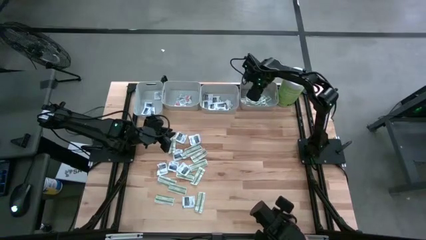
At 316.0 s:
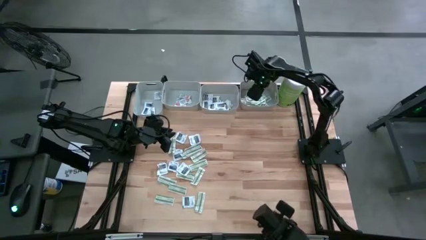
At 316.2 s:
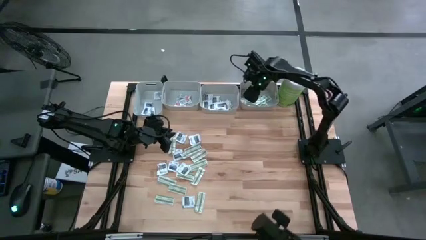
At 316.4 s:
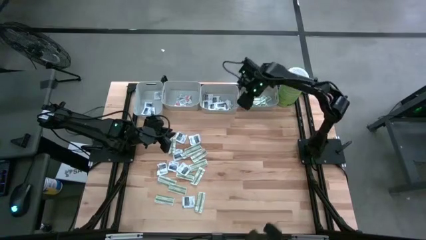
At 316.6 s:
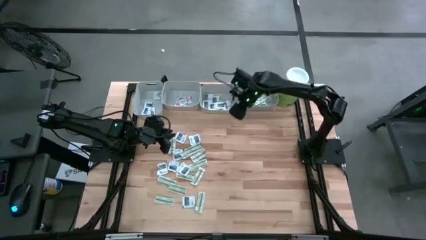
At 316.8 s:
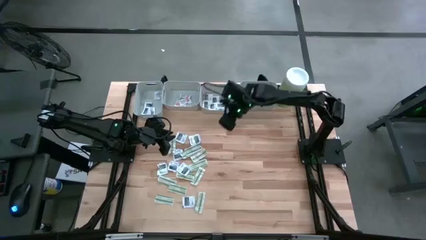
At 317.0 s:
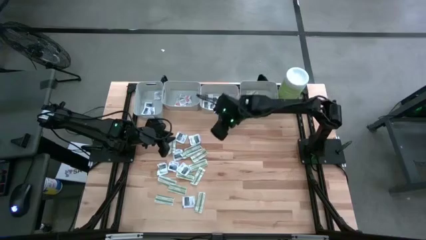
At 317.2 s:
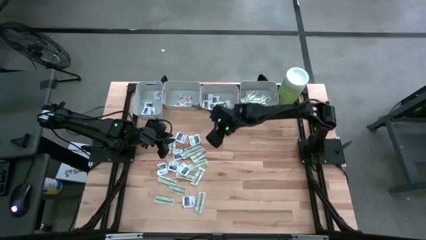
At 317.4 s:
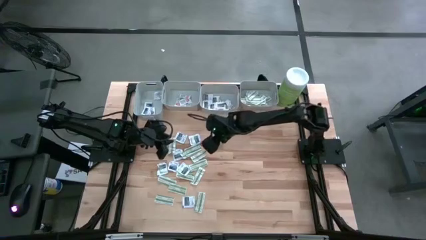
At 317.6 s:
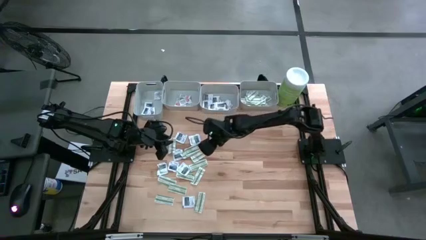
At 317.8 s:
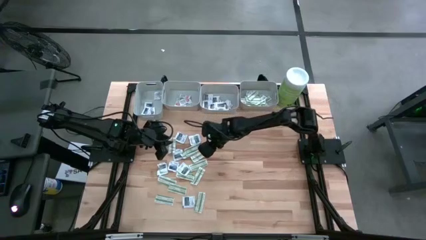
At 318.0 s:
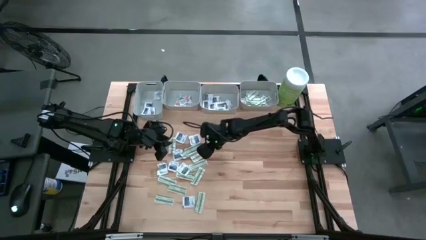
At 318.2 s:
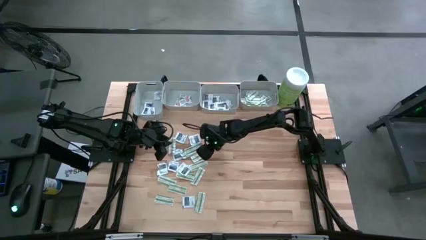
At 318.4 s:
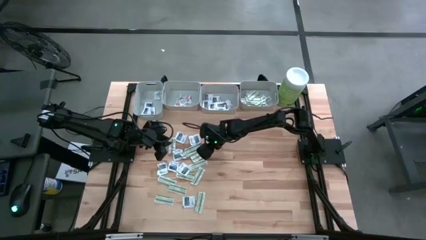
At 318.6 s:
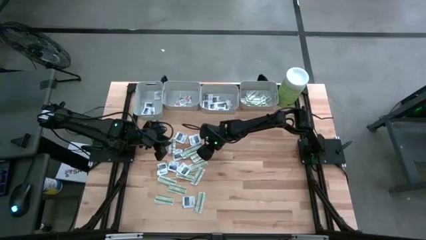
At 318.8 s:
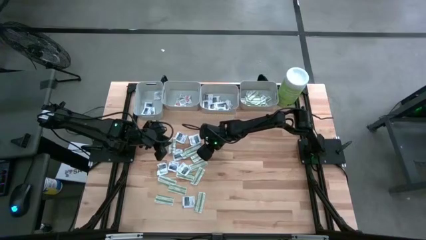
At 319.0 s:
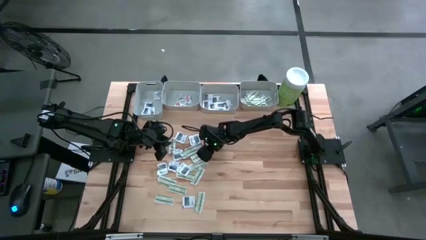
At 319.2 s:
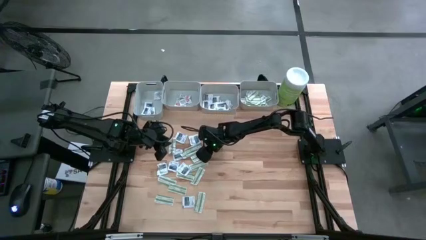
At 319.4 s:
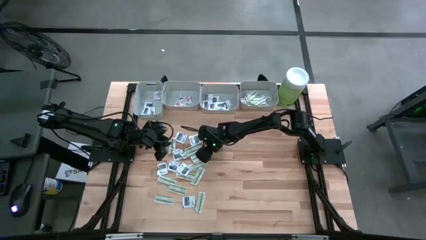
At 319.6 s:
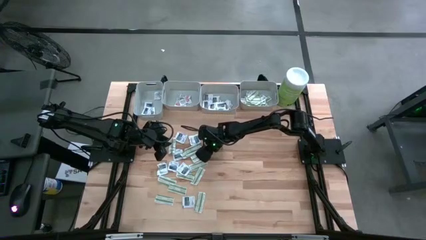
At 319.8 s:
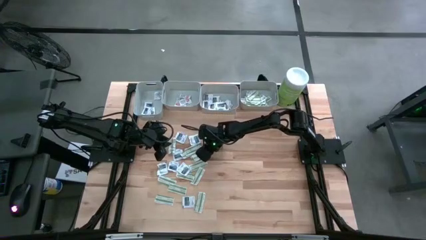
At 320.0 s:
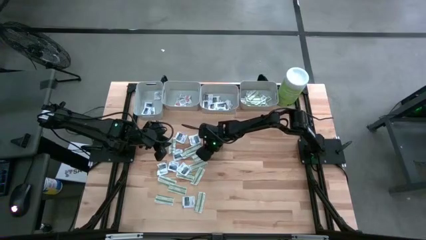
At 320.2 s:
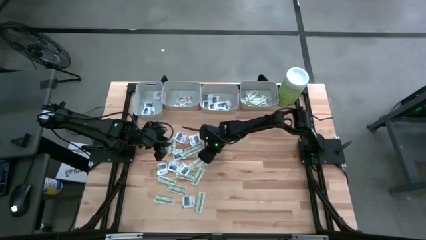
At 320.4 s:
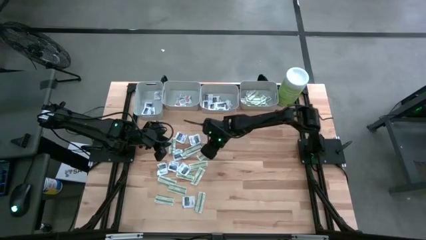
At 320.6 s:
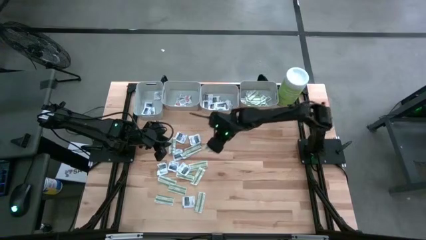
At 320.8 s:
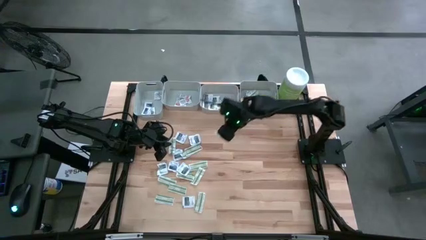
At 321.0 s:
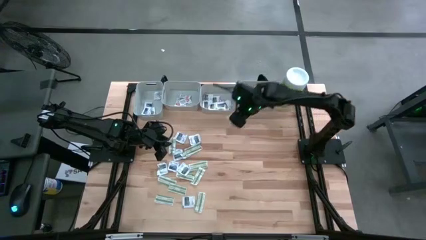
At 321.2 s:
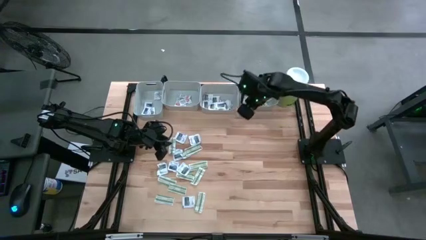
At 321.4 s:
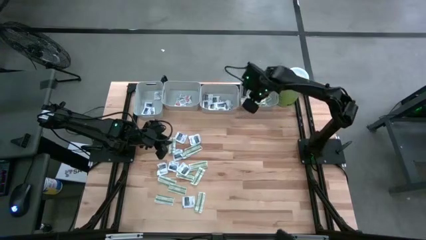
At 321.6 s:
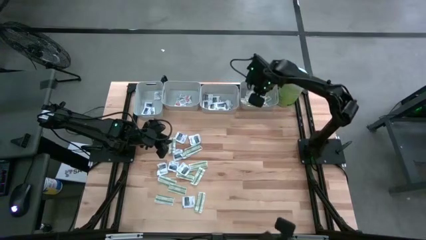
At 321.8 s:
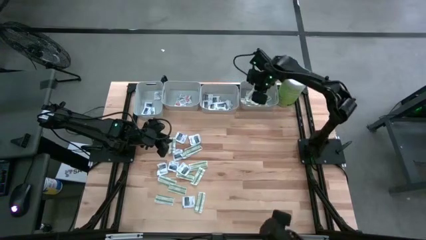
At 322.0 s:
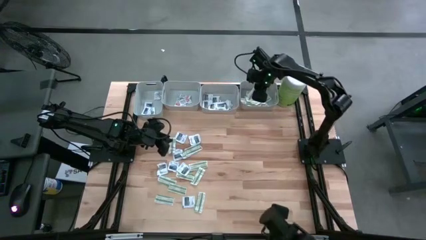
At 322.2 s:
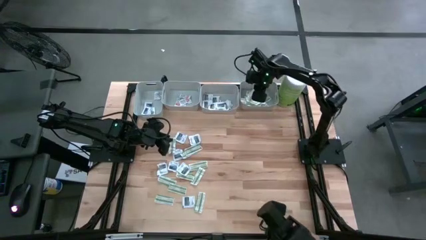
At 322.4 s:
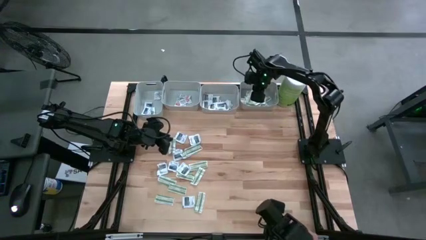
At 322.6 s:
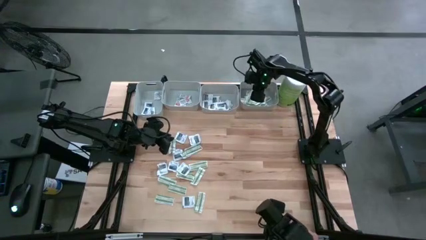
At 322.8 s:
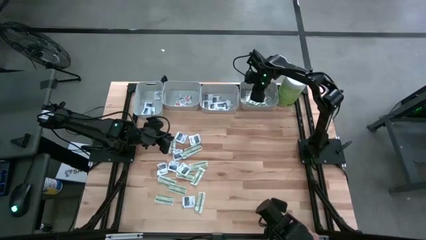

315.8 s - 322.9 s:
Task: Pick & Place First Aid Supplies
Put the green bandage into the right gray bin

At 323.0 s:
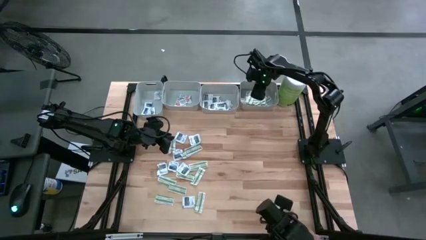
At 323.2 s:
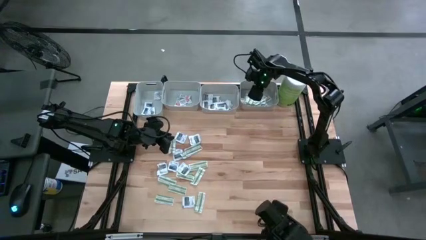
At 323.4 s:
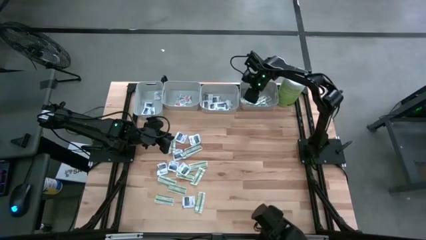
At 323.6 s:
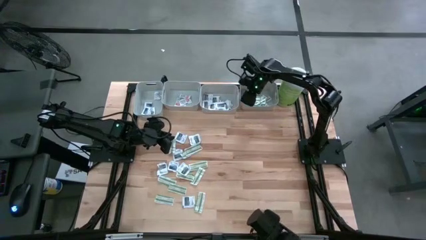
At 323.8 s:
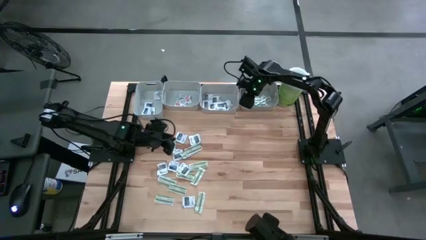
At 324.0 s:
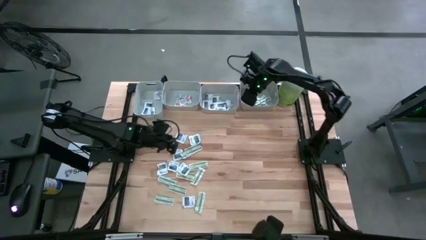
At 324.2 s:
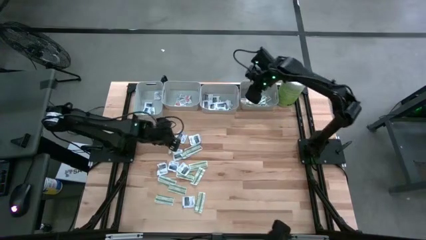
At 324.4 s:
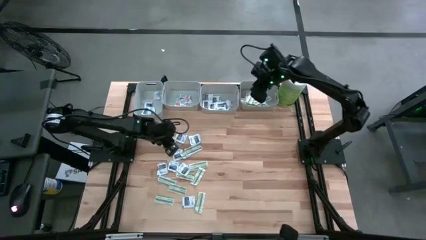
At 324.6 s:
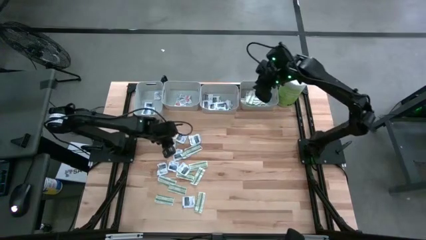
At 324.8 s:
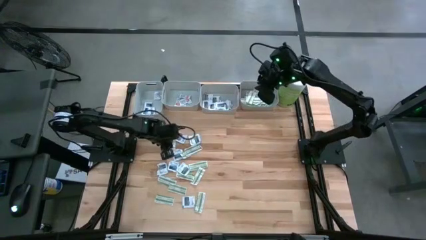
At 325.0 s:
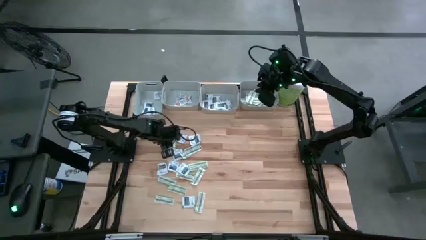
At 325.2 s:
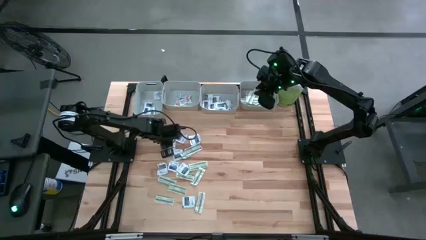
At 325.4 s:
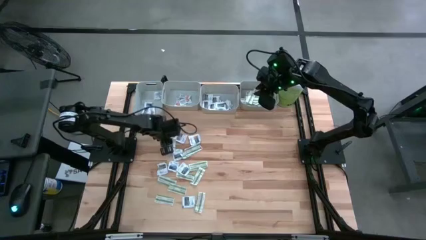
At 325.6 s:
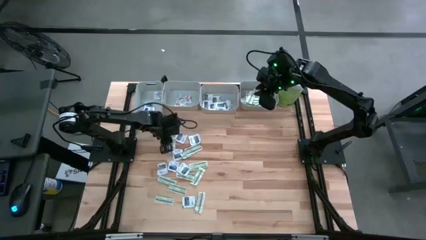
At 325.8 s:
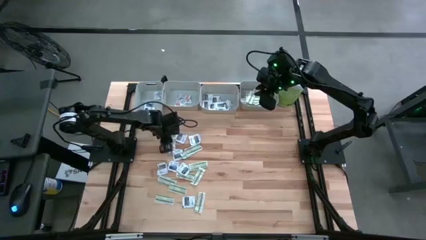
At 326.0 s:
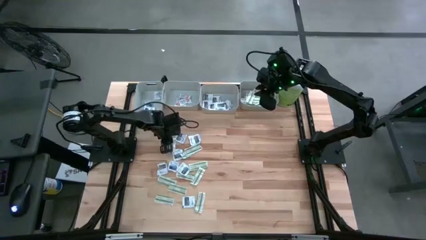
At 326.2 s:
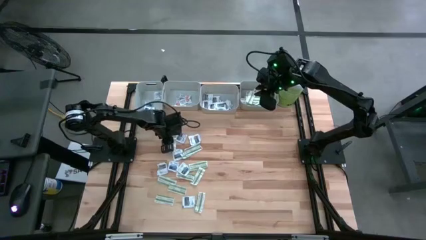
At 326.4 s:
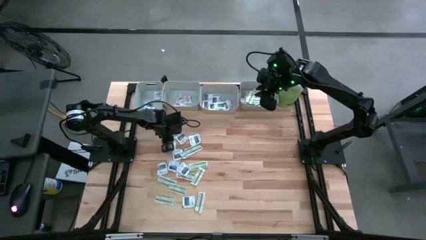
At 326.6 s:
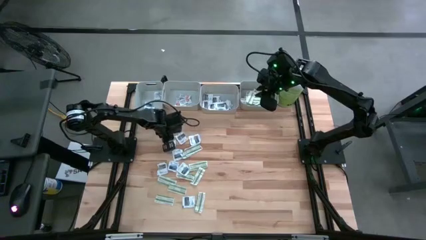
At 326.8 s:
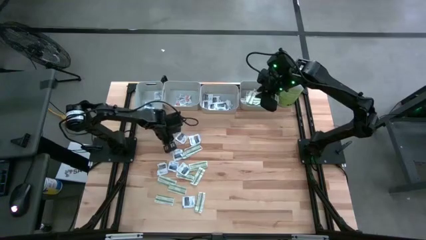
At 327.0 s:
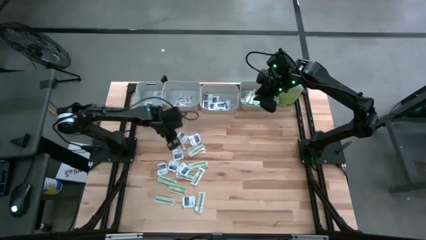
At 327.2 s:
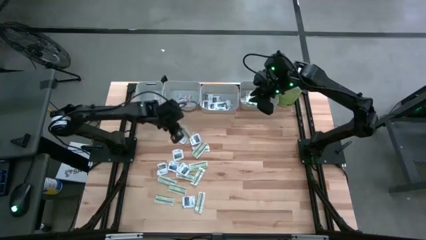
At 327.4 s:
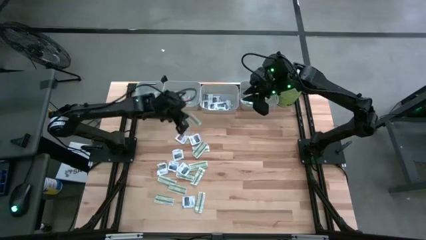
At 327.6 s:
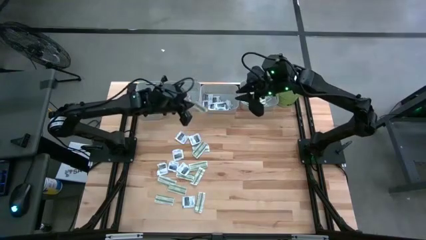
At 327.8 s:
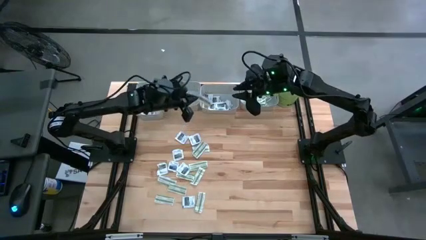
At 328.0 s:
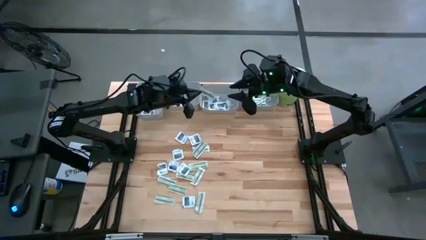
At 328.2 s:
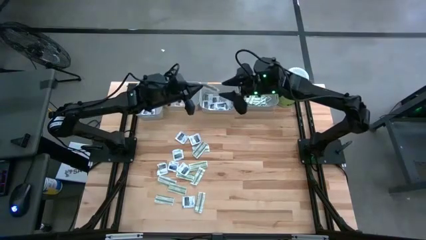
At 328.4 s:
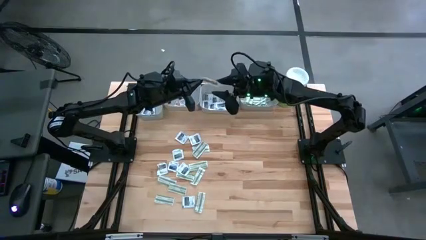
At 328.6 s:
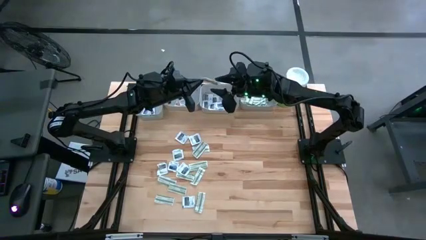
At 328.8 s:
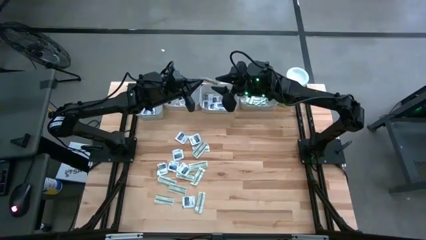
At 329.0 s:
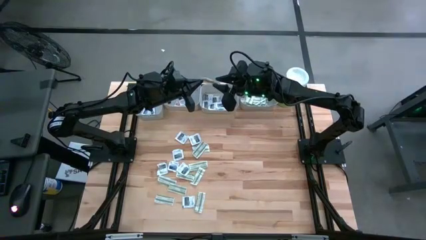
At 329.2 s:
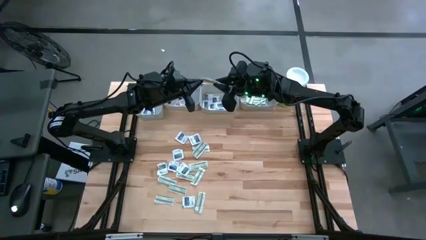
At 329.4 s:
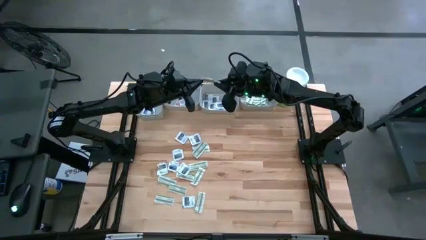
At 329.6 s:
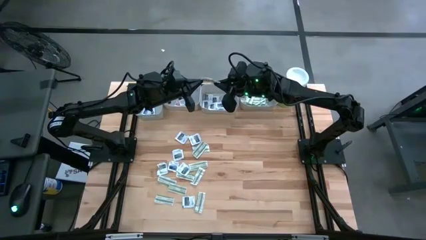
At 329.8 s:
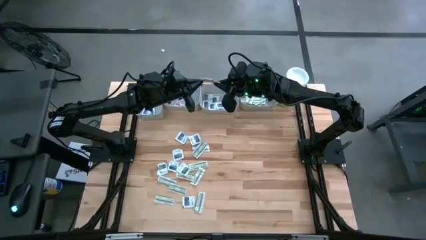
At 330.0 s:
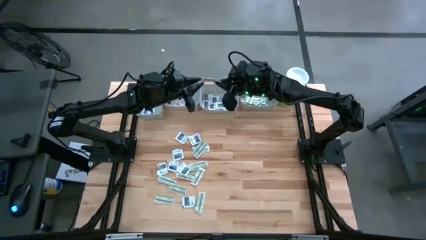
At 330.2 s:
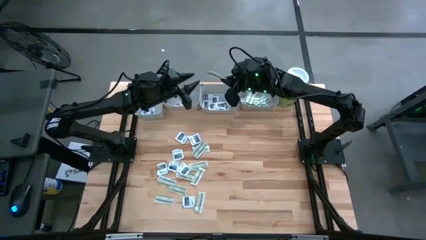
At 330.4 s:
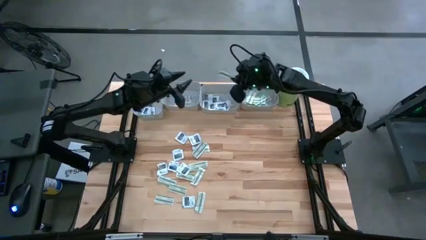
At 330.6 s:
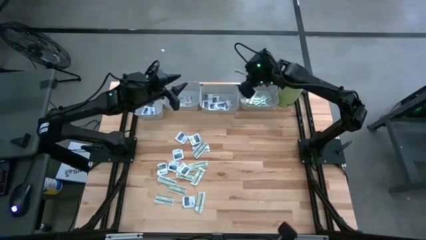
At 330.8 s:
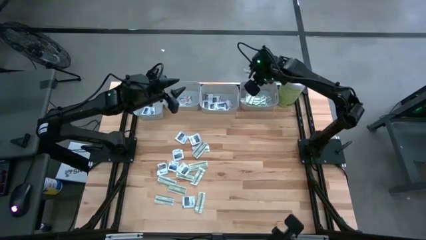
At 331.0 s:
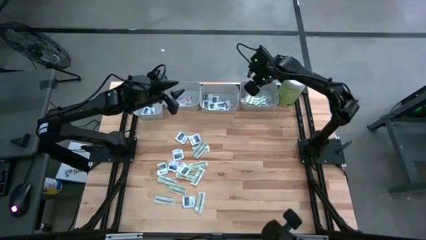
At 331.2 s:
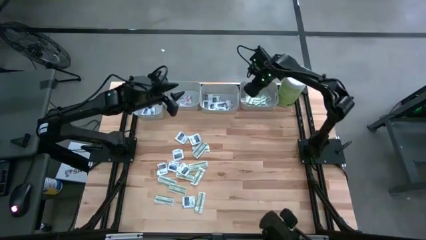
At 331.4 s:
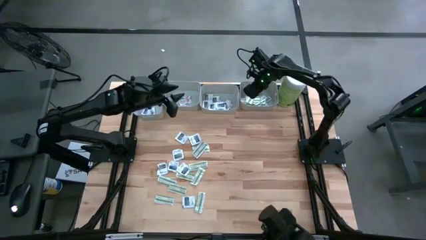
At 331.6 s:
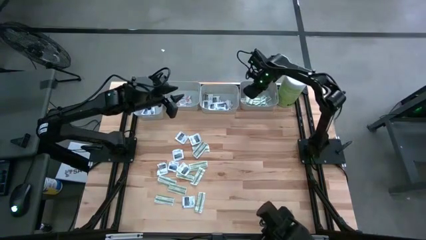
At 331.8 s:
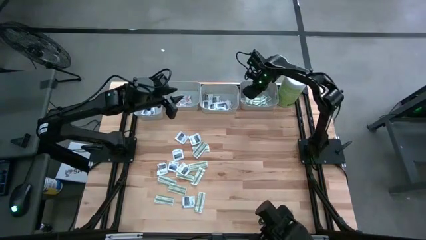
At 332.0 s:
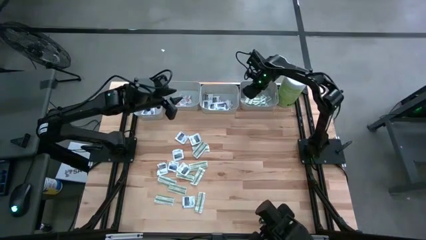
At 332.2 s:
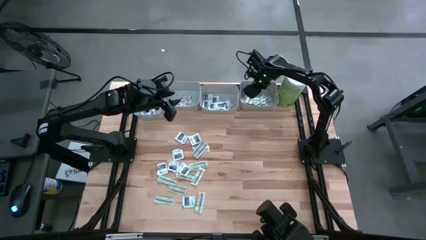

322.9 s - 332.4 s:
Put the green bandage into the right gray bin
